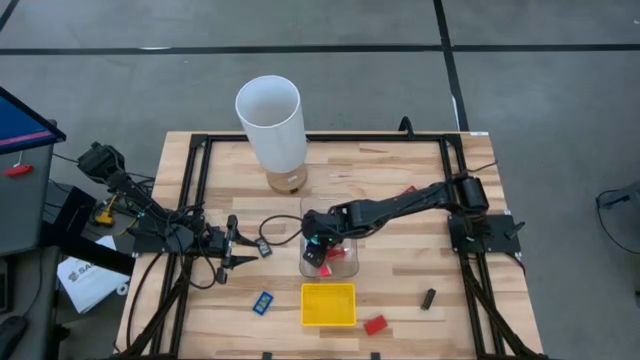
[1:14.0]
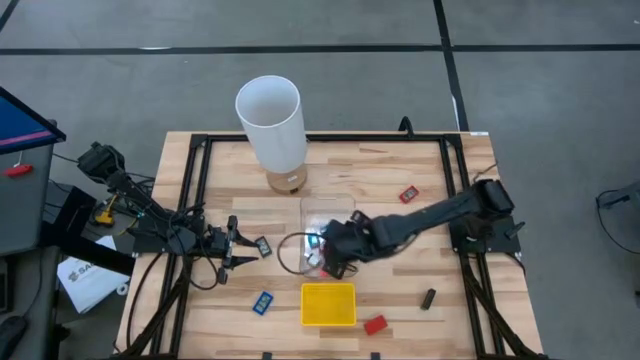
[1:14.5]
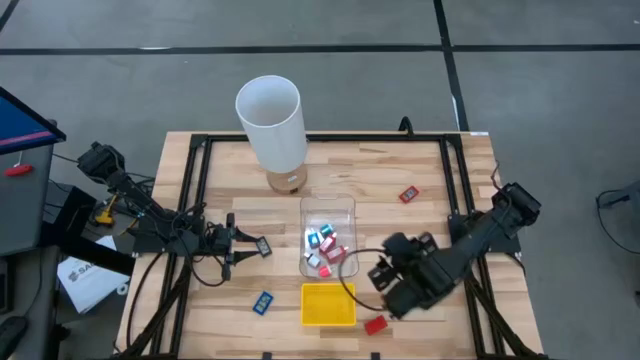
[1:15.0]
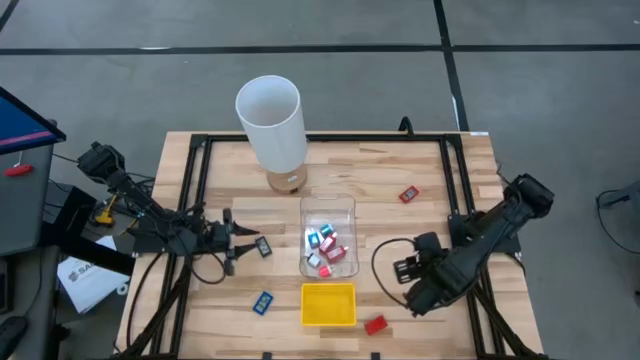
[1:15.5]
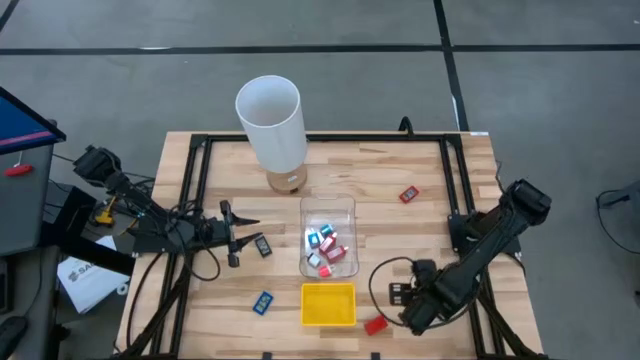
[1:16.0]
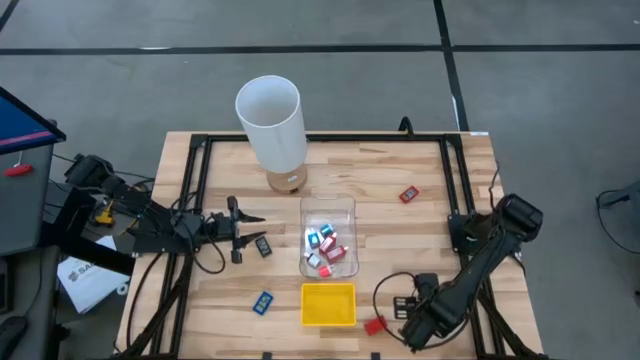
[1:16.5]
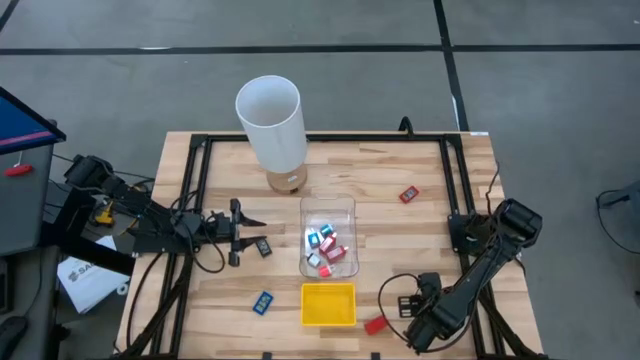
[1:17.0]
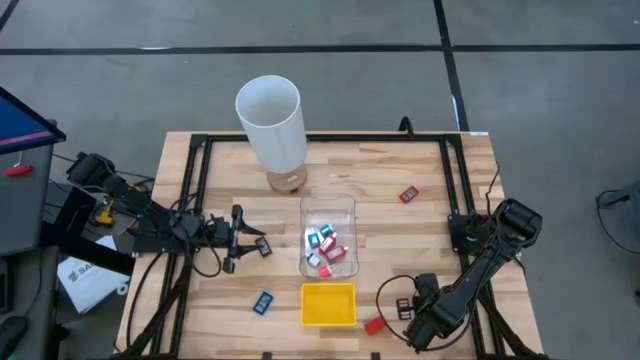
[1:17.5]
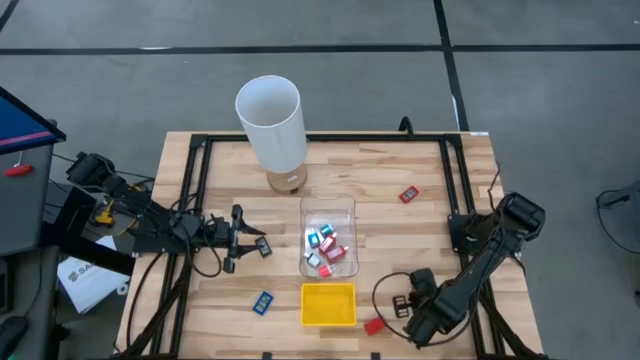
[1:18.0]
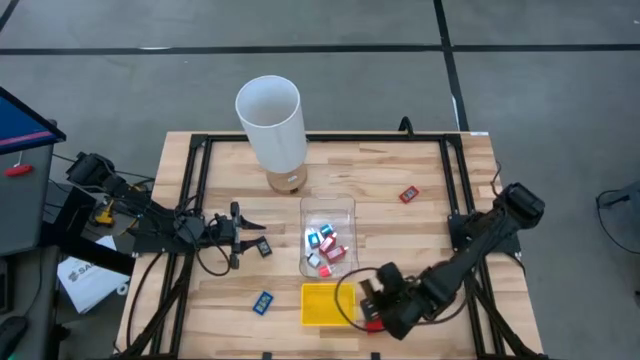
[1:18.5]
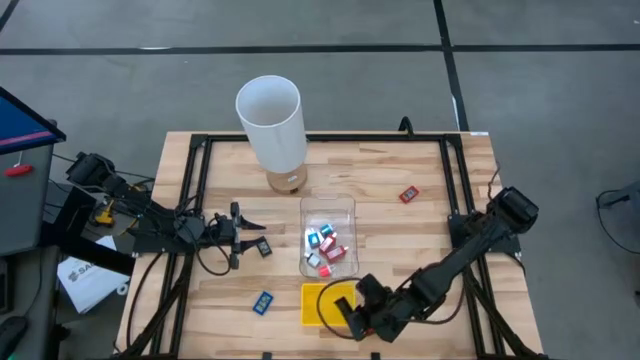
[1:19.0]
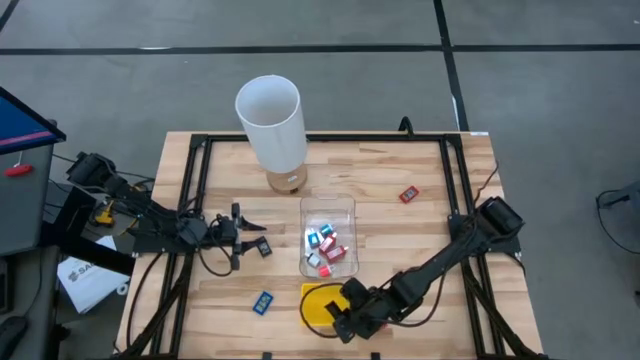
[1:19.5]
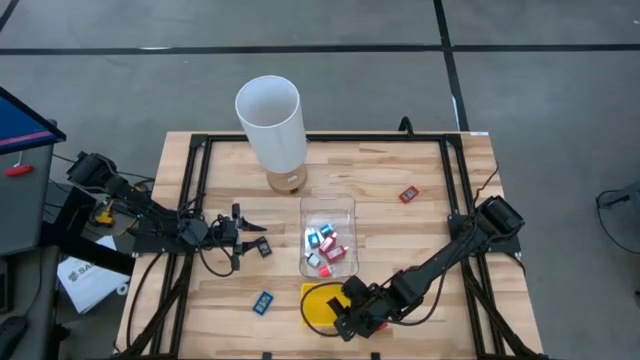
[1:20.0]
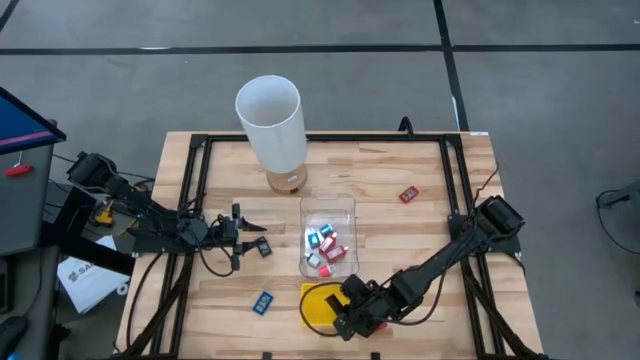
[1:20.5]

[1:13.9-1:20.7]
Task: Pick & Place Office items
Put the bottom black digital clock into the yellow bin

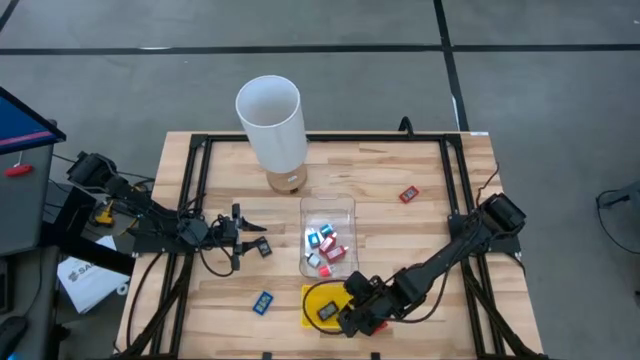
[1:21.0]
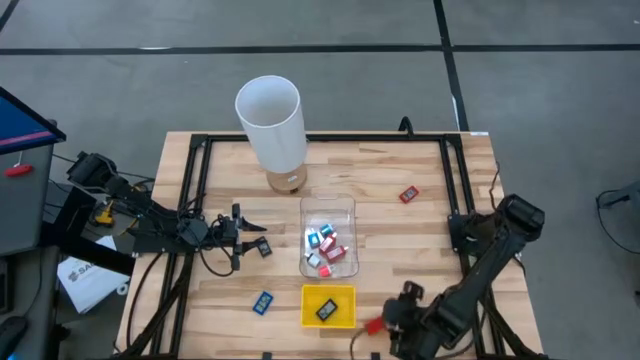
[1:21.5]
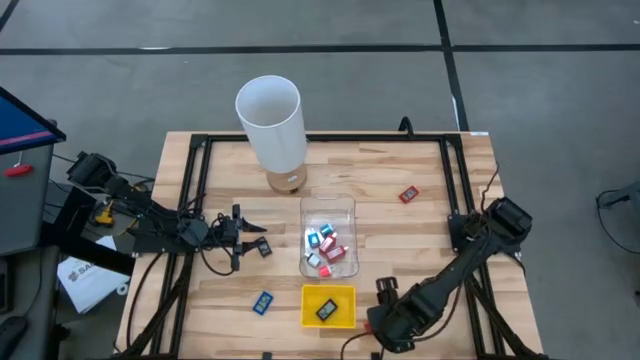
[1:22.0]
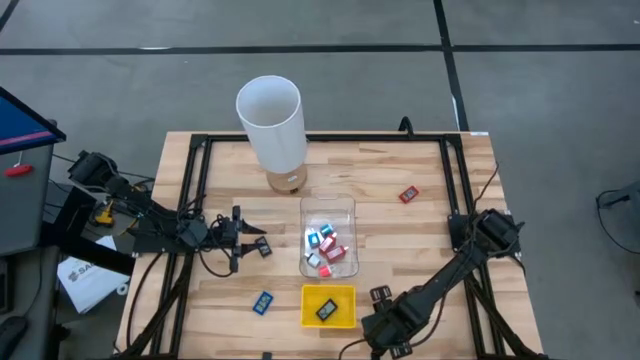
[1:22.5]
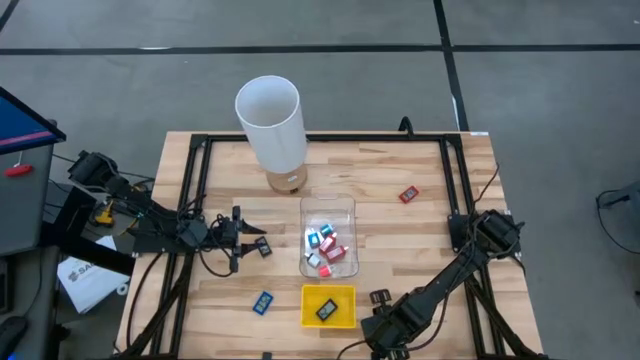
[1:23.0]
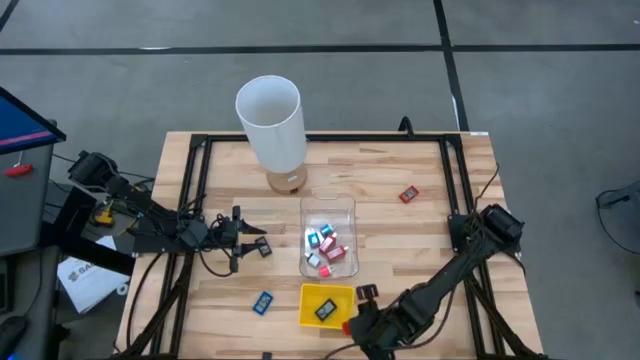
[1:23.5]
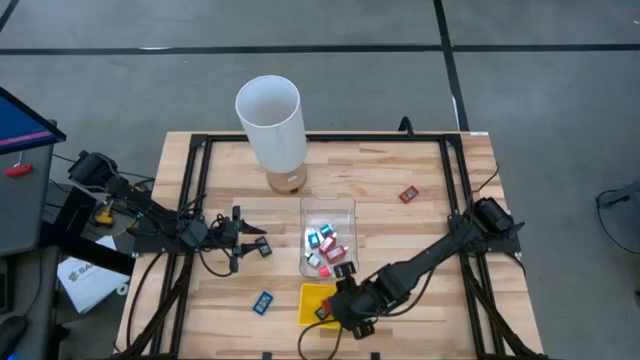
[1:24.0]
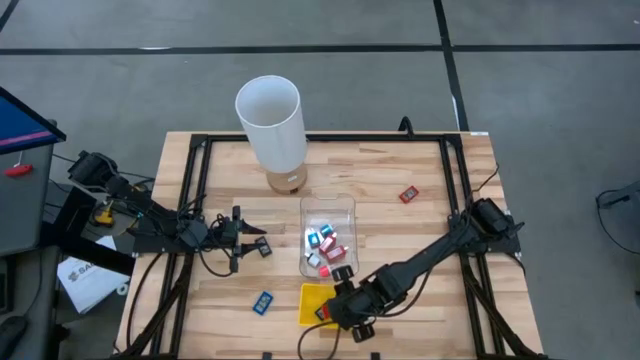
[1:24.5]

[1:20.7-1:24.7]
Put the bottom red digital clock into the yellow bin

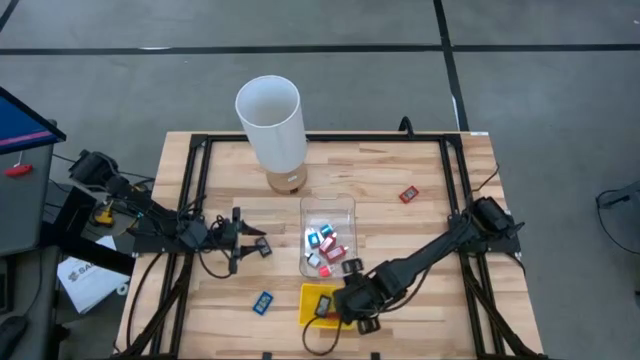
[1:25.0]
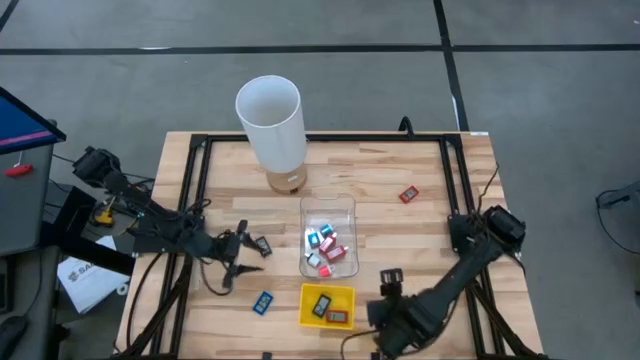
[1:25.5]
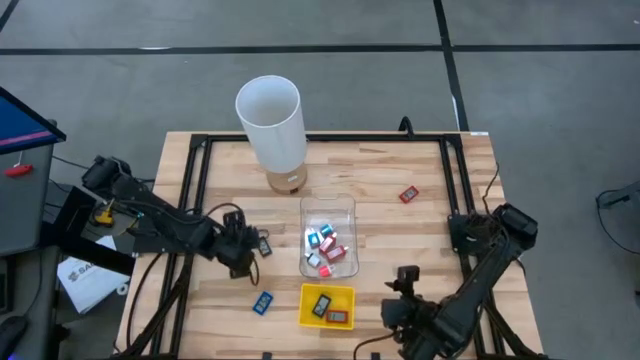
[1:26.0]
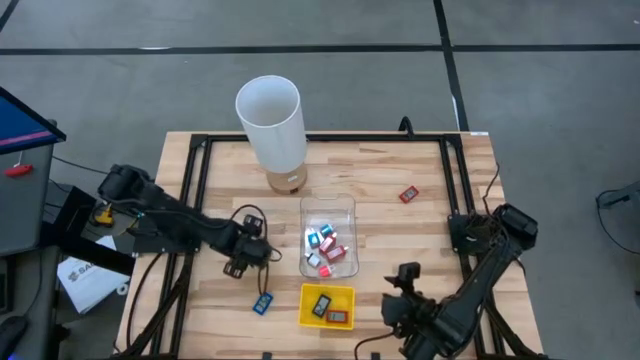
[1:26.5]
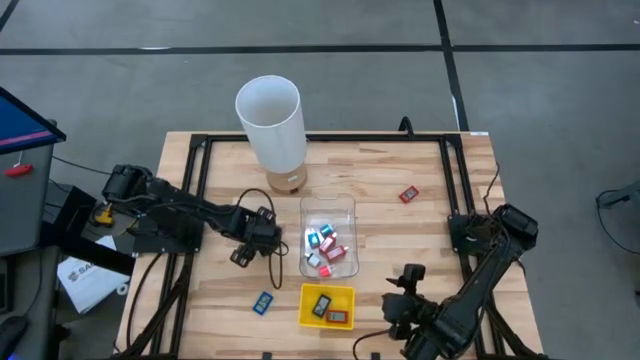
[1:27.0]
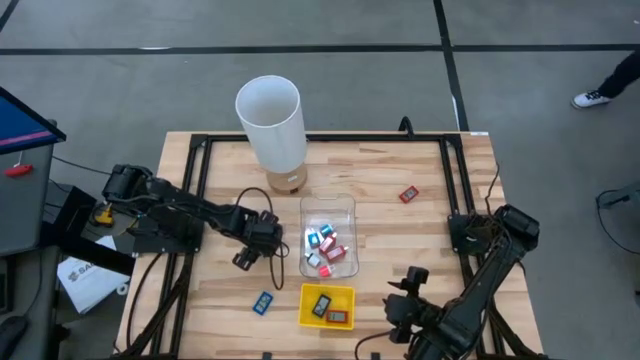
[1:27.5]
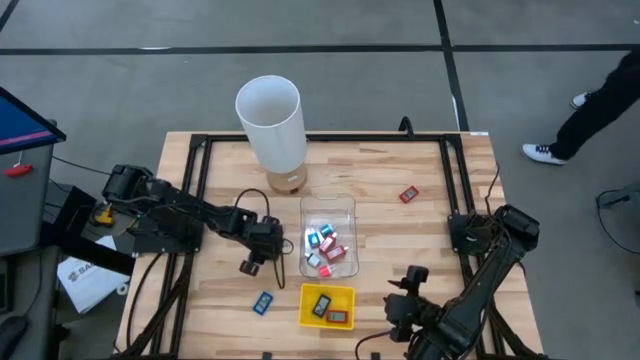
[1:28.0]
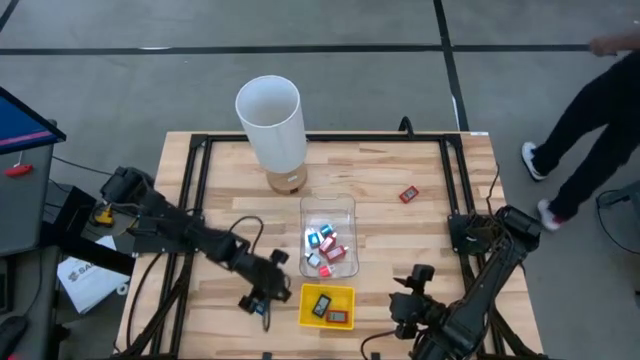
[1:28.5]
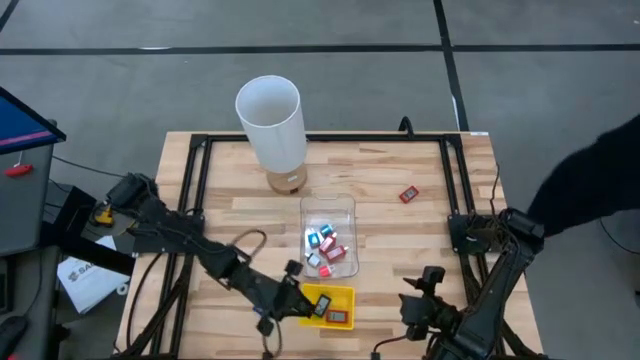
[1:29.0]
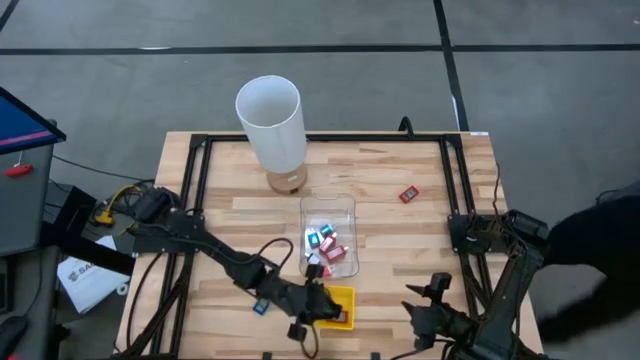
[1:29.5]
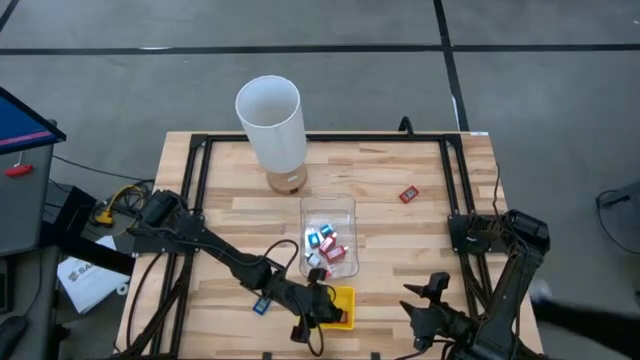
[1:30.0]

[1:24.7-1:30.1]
Put the black digital clock into the yellow bin

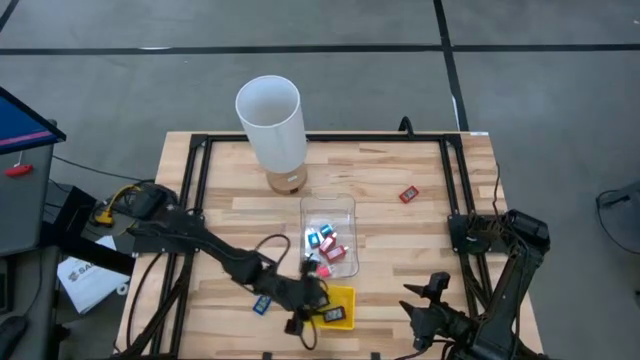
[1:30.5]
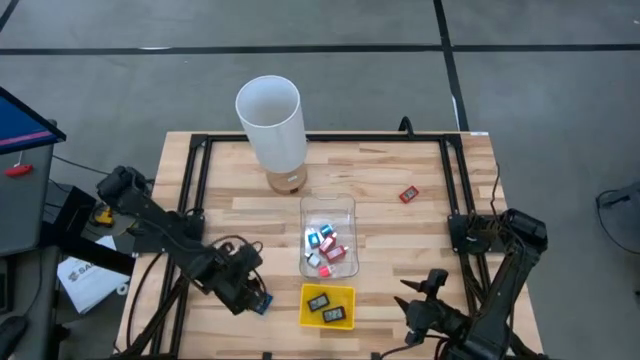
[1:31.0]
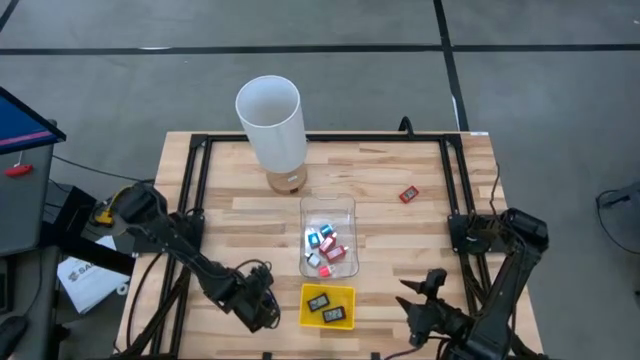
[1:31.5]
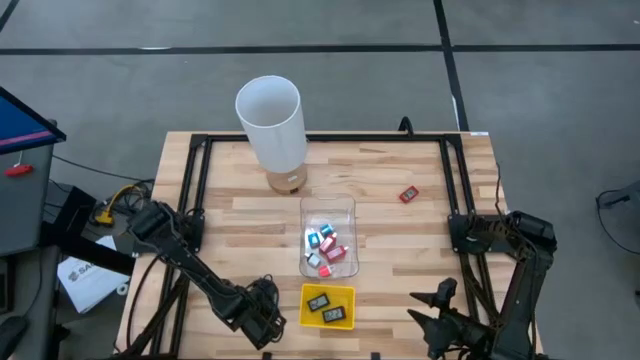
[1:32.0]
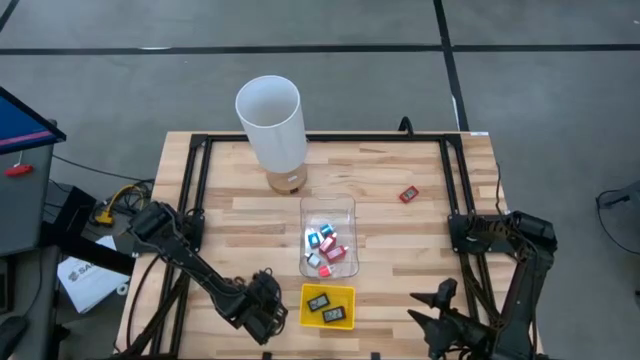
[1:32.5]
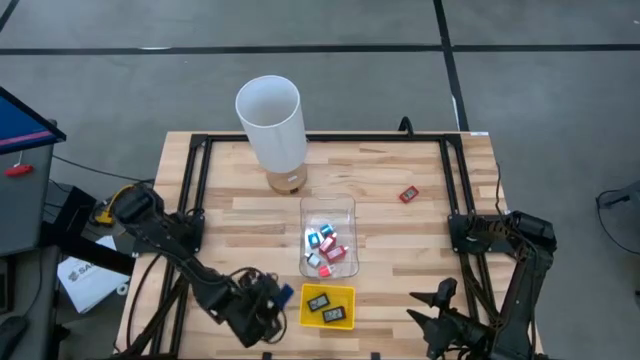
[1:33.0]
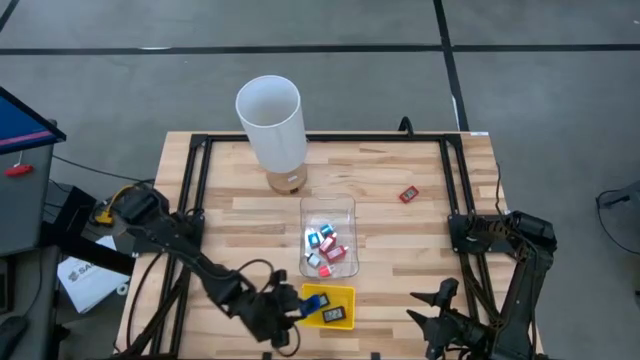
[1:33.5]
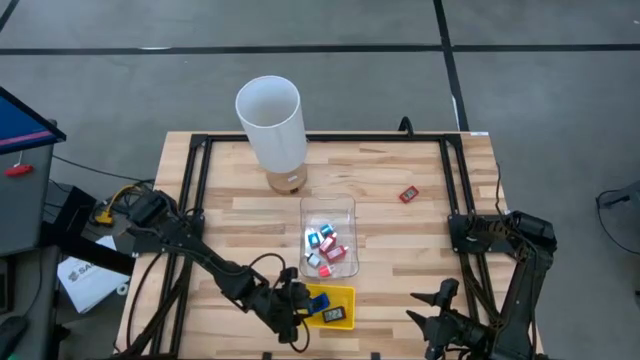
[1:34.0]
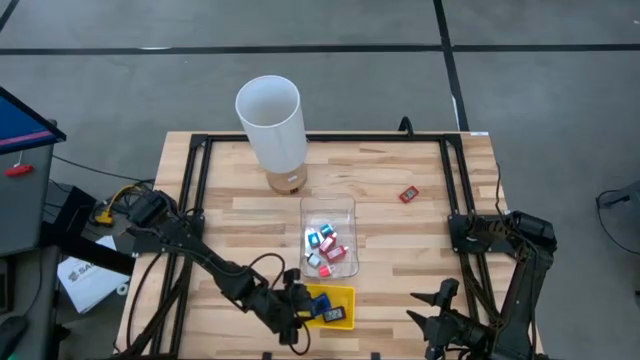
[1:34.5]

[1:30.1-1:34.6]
Put the blue digital clock into the yellow bin
